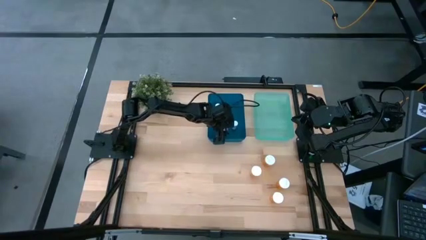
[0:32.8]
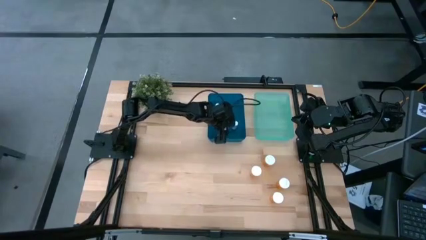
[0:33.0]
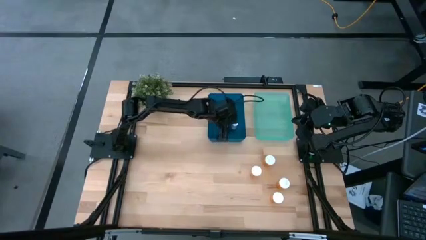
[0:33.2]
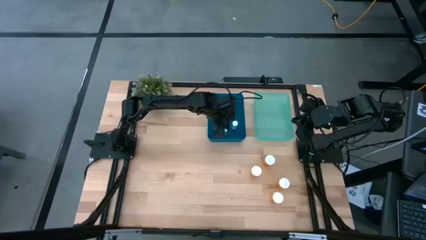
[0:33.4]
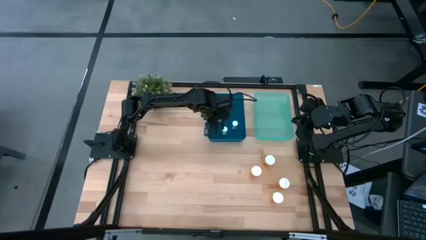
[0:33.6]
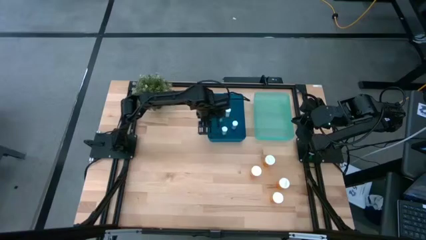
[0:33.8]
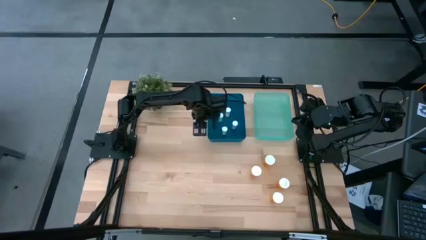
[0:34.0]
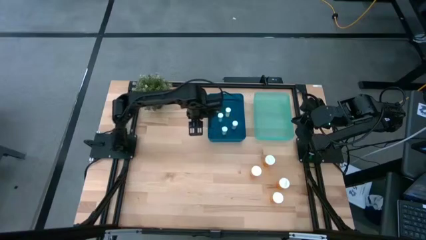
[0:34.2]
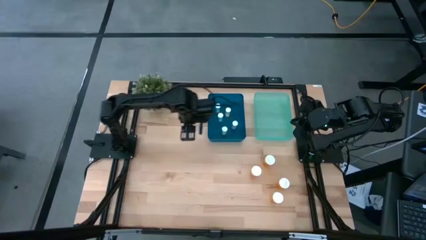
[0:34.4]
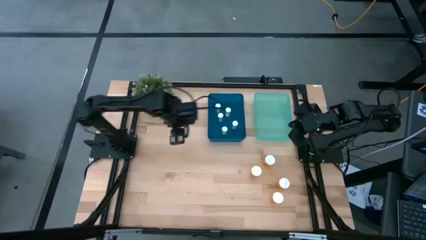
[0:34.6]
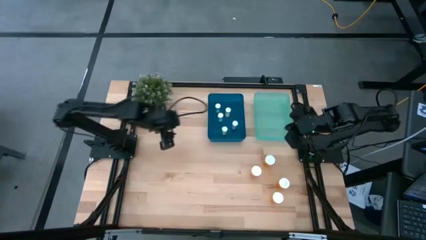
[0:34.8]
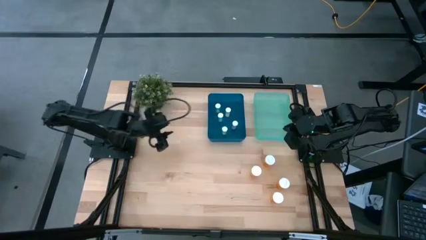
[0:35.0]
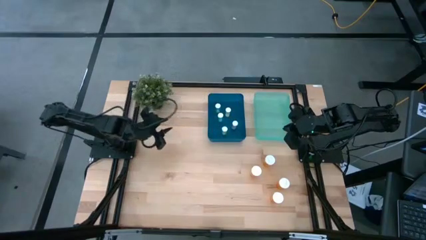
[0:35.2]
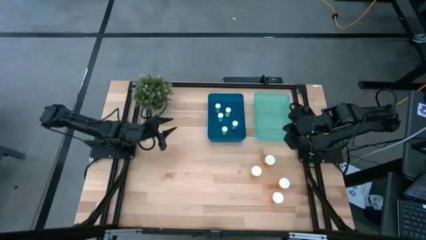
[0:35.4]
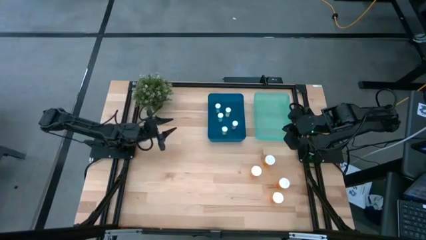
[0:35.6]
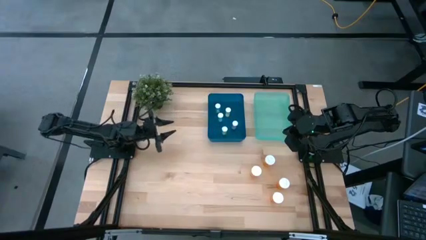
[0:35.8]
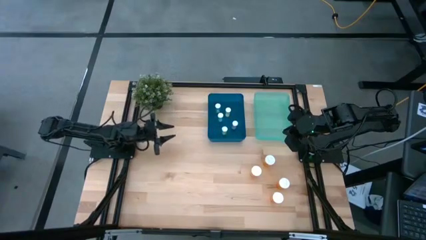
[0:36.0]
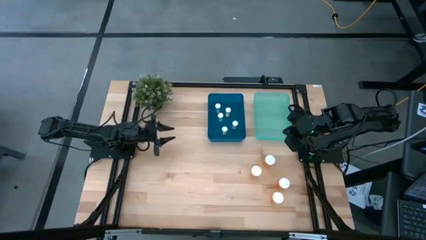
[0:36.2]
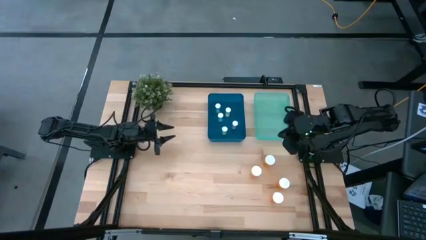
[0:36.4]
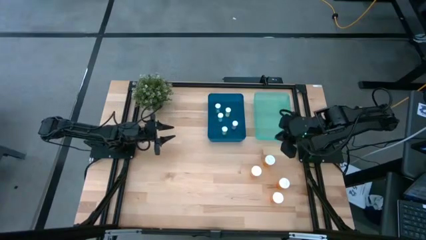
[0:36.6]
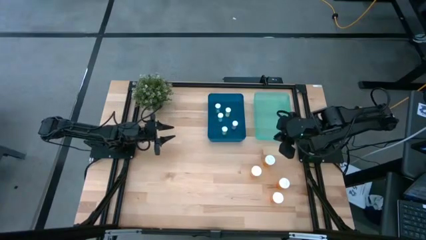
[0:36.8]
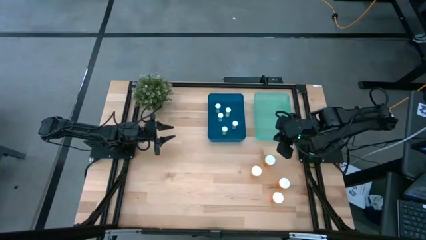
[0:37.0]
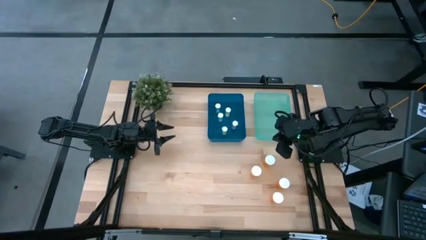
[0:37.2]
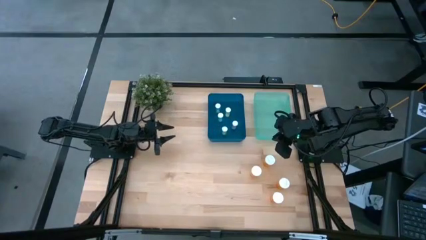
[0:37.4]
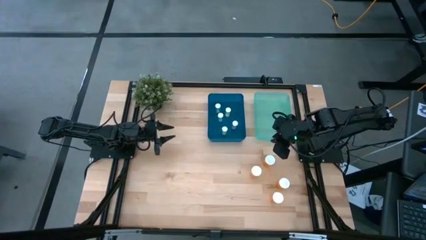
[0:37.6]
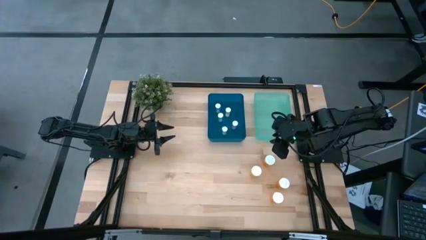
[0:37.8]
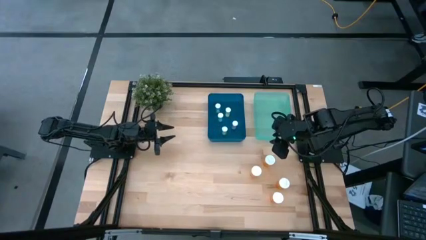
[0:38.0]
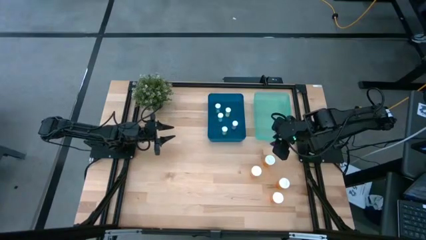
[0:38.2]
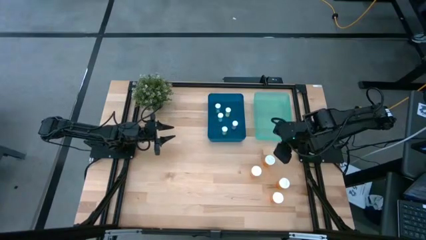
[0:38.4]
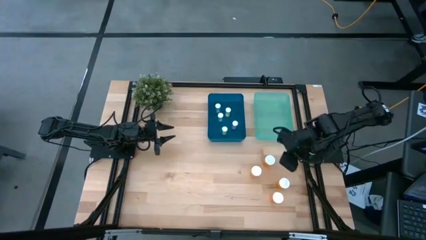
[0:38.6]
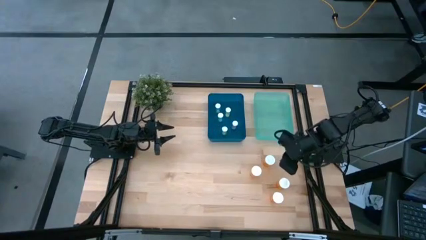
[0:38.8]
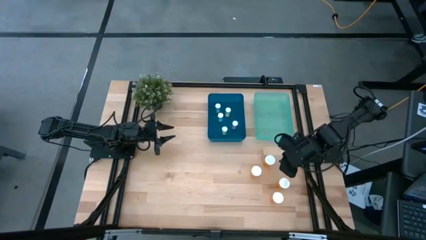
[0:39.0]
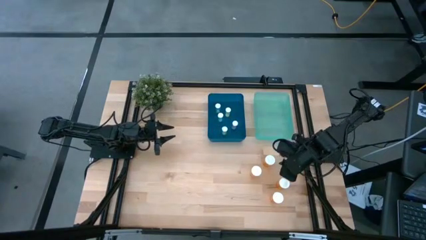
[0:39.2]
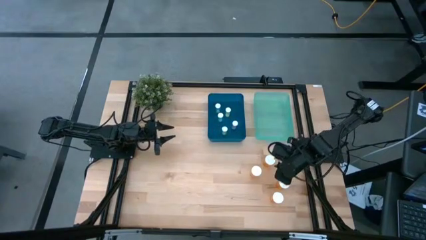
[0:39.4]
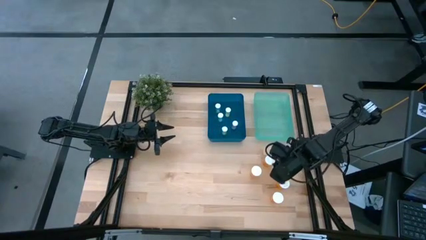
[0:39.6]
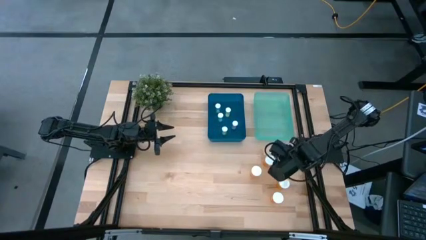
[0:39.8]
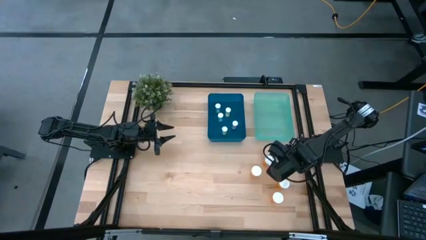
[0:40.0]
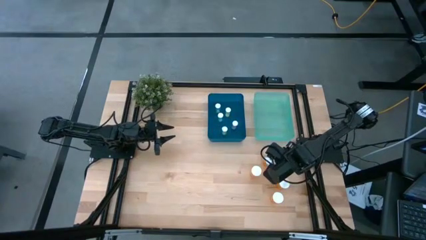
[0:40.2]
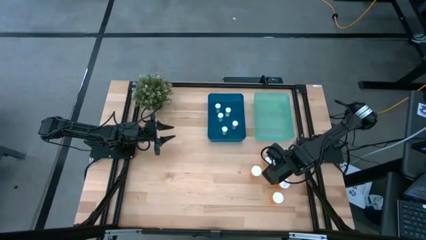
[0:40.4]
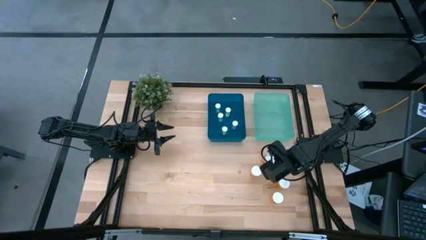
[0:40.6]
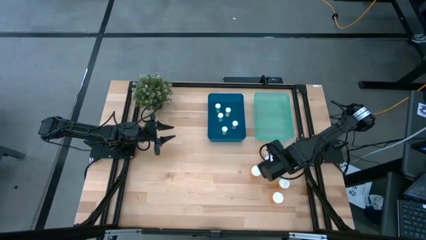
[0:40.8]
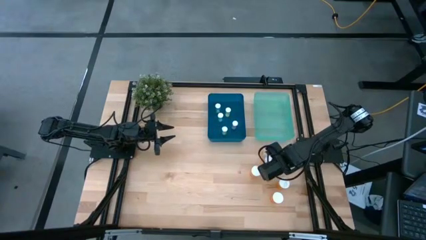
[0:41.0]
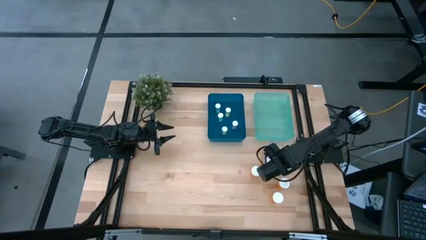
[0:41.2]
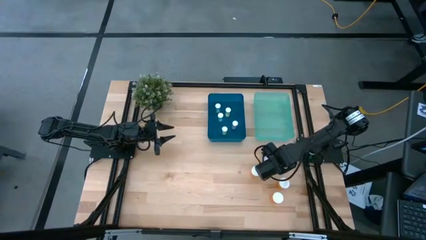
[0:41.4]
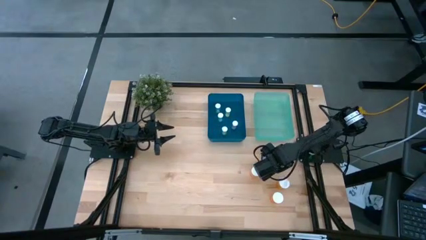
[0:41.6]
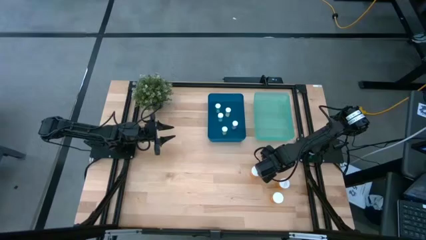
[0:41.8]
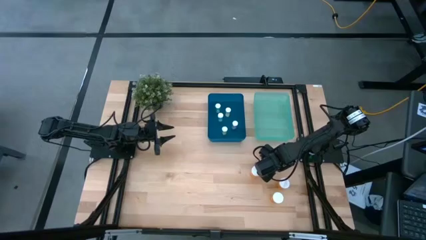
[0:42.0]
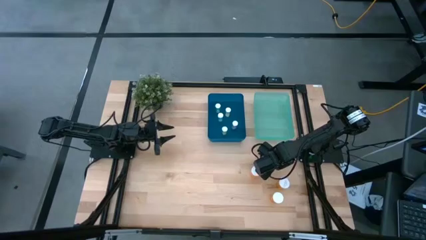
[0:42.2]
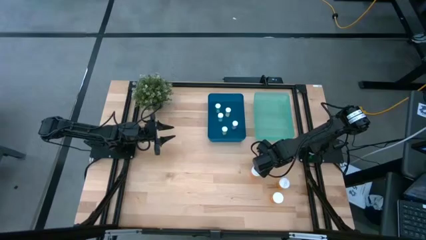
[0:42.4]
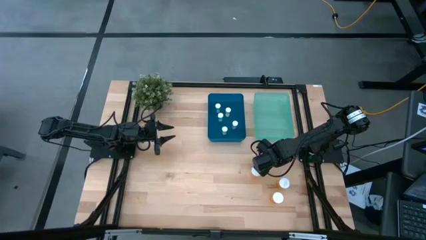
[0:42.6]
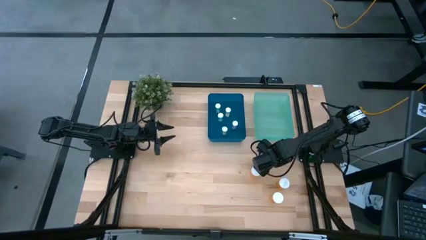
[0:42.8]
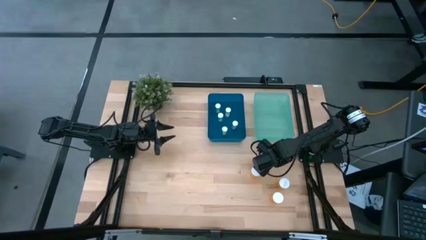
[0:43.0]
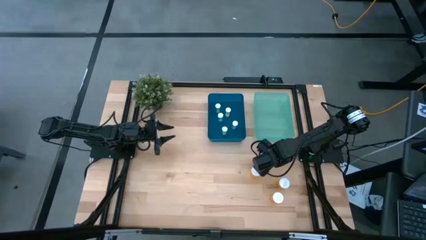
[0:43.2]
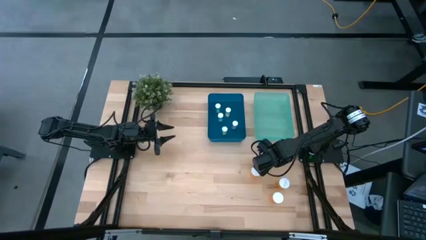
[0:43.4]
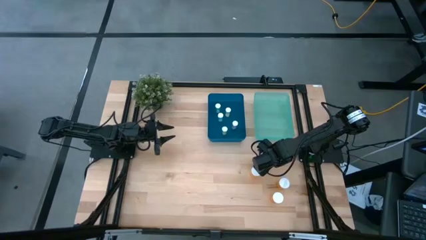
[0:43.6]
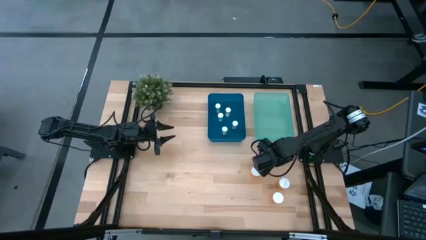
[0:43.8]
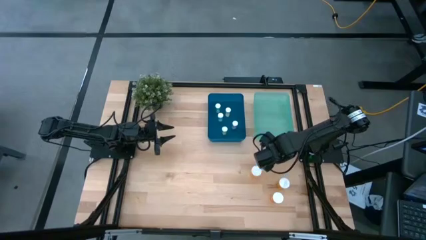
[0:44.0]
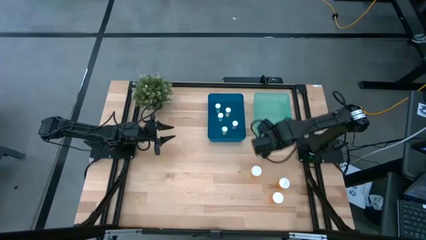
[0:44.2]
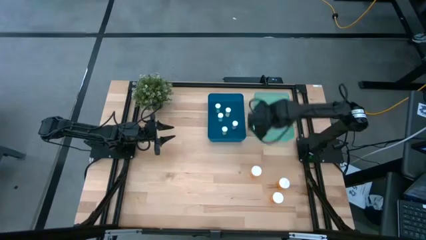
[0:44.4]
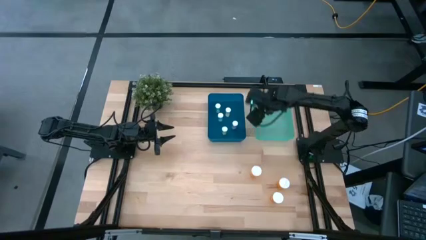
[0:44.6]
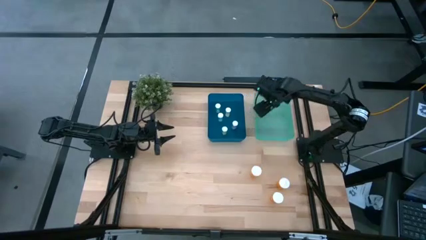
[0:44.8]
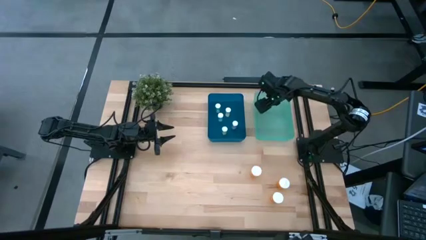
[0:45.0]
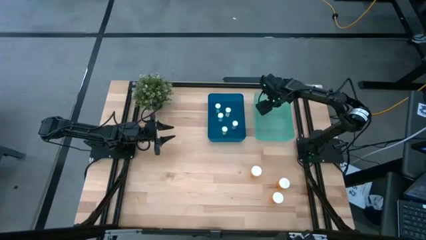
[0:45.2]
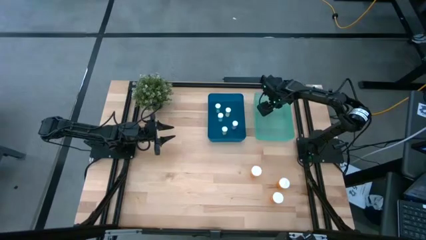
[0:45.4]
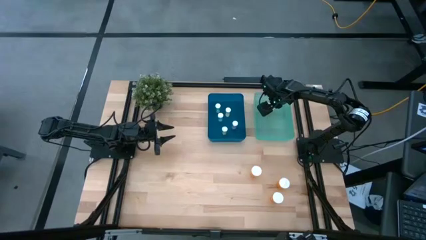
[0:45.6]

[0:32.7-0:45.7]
Task: Pick and place medicine bottles into bin by pill shape (circle, oval)
Put the large orange pill bottle into the green bin

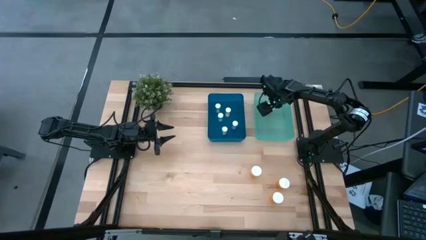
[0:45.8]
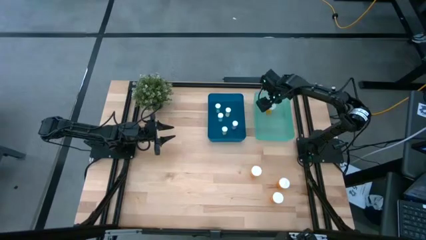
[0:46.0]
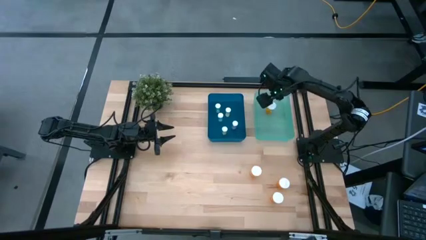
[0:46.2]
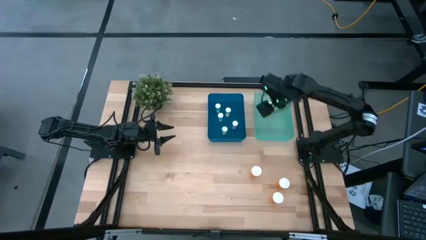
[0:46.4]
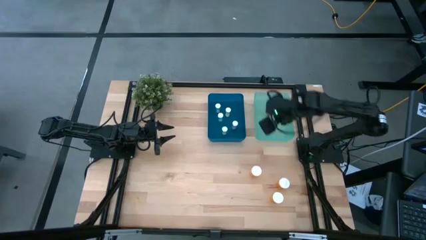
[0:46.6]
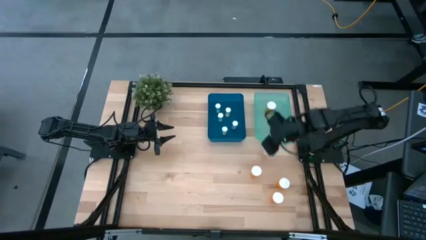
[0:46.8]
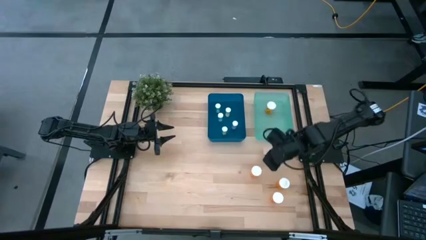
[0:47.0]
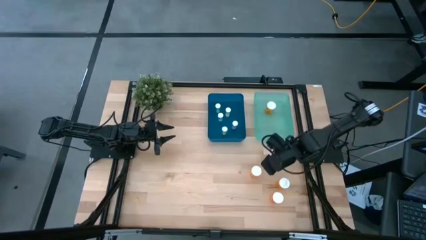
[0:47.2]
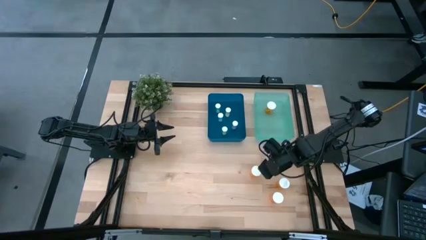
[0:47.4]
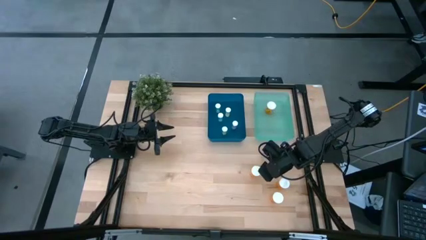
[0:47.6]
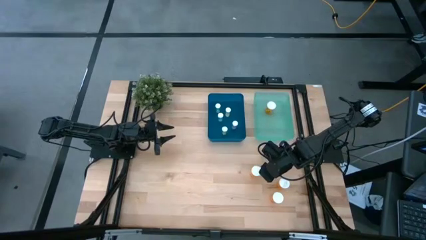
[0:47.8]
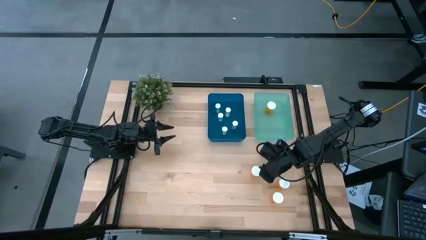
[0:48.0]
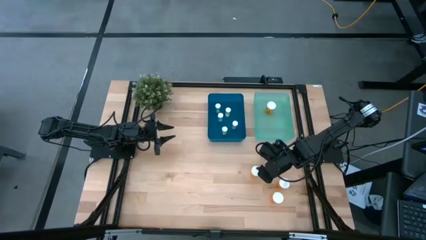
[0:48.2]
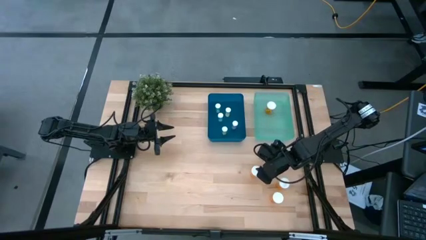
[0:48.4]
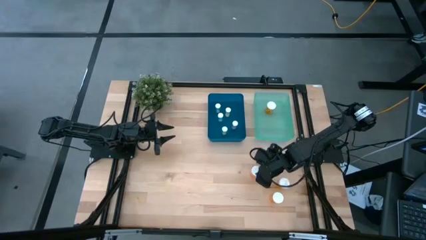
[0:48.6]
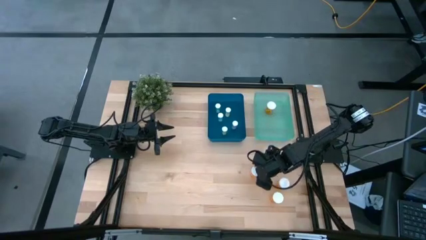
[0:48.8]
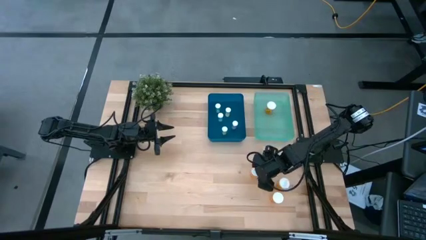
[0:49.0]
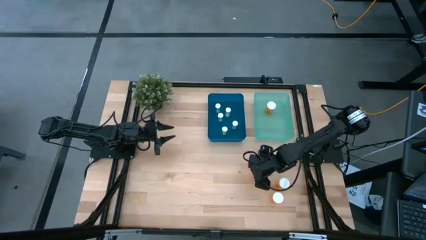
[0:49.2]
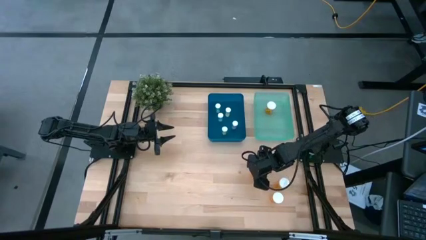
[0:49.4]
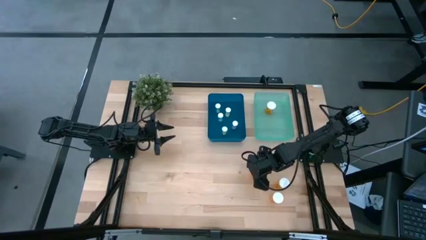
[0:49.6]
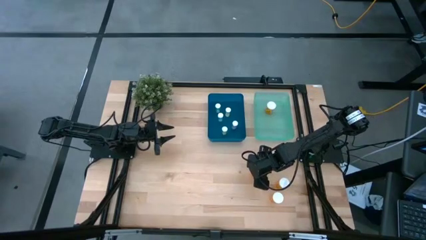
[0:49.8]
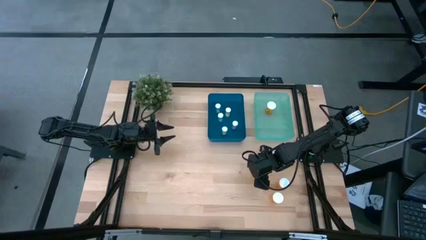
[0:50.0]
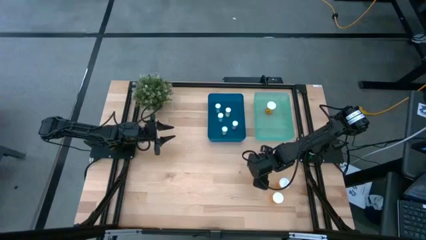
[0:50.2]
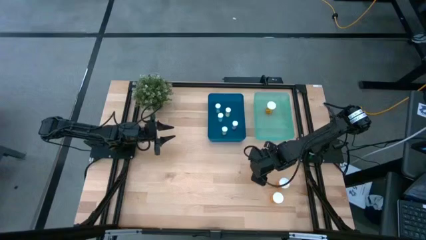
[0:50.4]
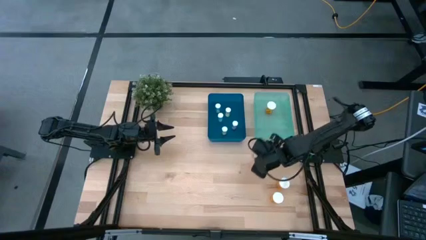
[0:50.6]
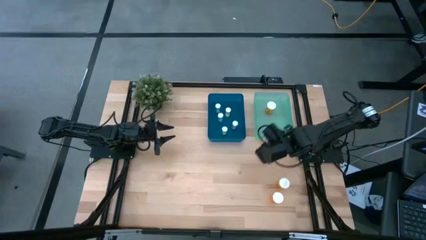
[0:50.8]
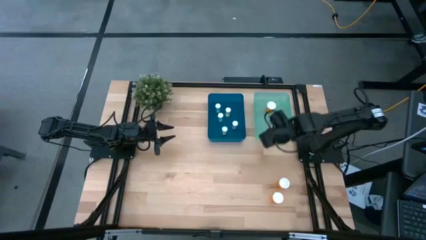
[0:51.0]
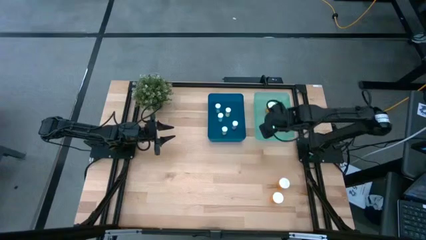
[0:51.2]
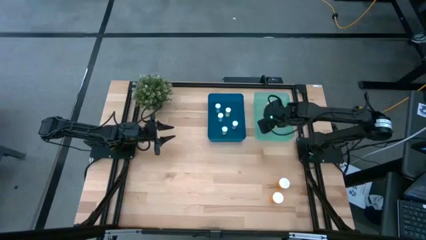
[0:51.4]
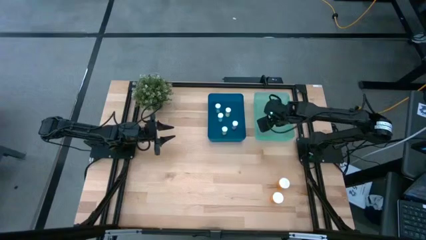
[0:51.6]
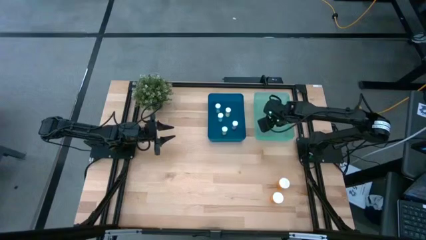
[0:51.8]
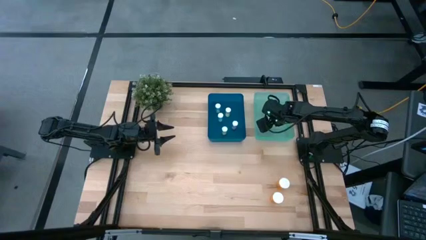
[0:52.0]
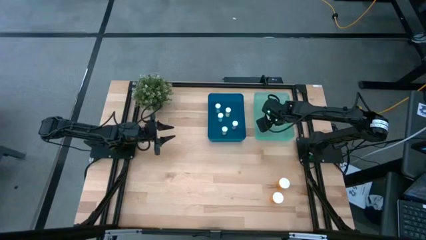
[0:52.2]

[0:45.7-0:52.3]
Put the large orange pill bottle into the green bin
